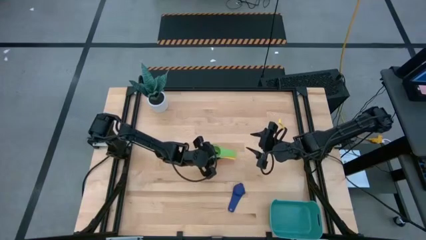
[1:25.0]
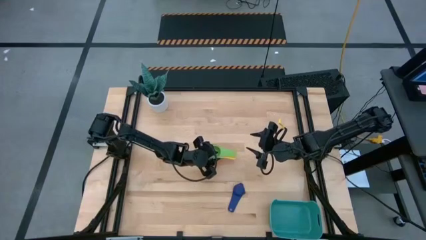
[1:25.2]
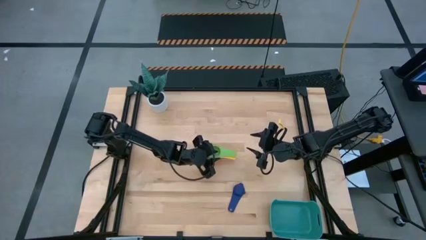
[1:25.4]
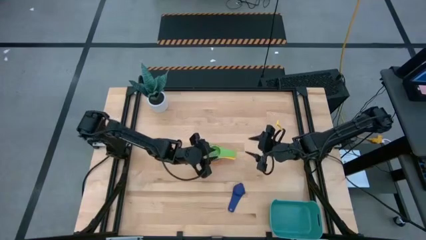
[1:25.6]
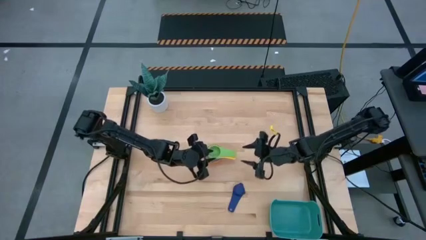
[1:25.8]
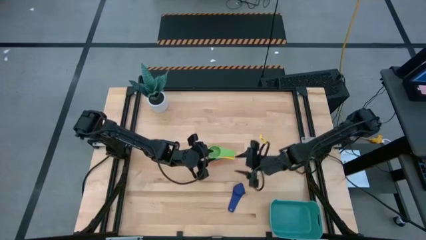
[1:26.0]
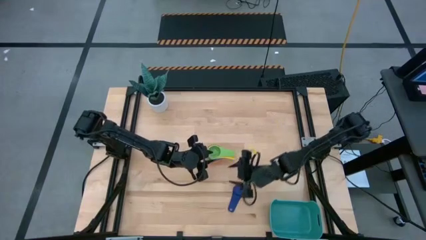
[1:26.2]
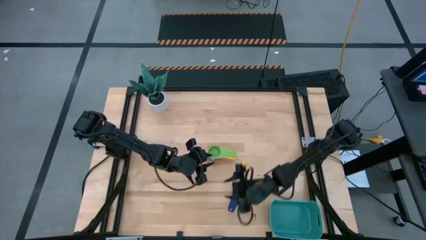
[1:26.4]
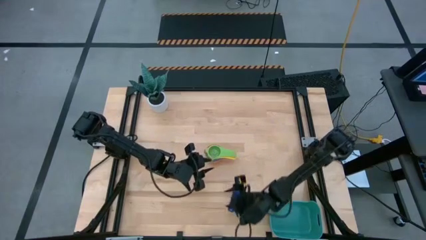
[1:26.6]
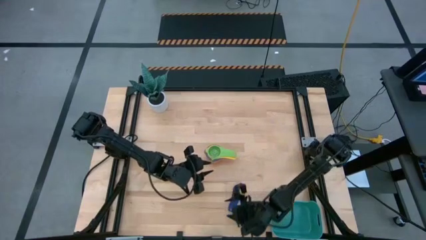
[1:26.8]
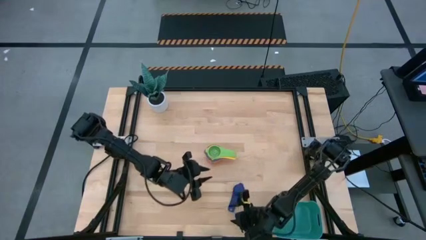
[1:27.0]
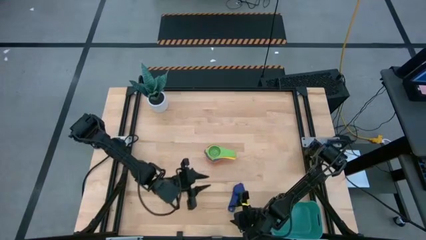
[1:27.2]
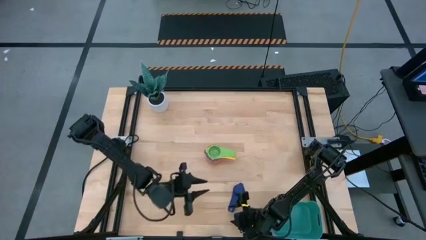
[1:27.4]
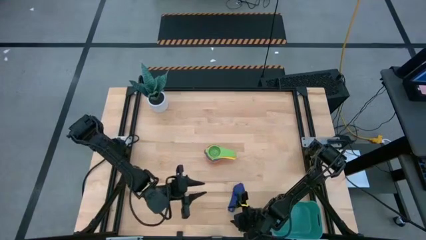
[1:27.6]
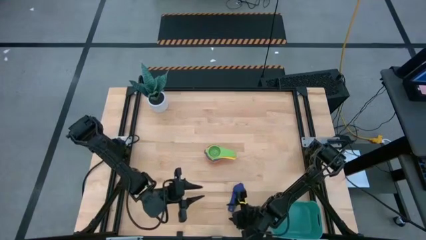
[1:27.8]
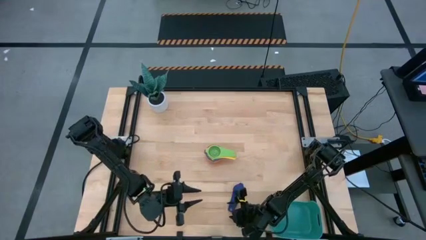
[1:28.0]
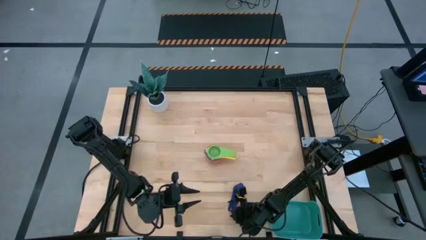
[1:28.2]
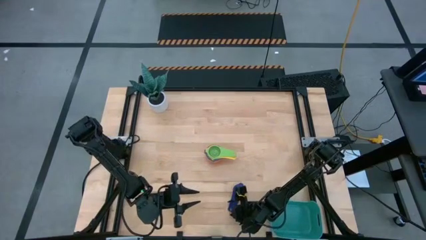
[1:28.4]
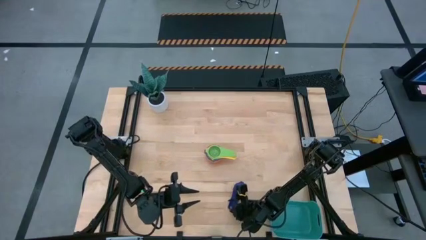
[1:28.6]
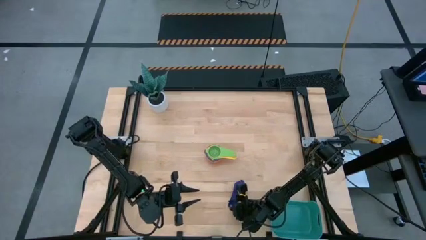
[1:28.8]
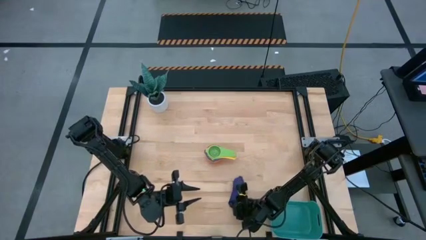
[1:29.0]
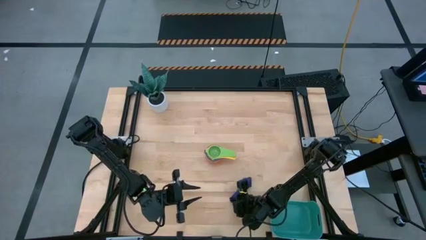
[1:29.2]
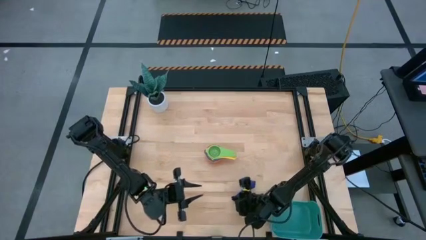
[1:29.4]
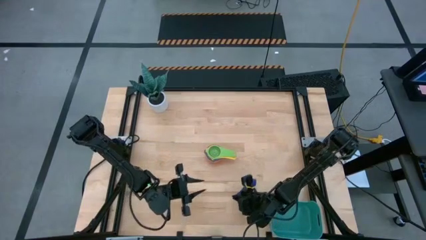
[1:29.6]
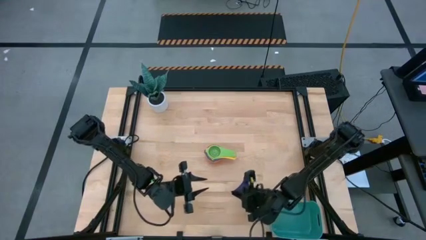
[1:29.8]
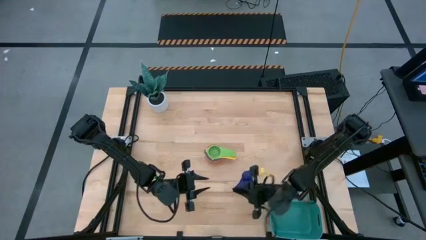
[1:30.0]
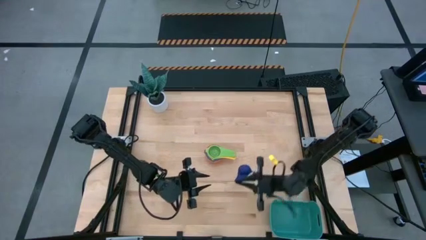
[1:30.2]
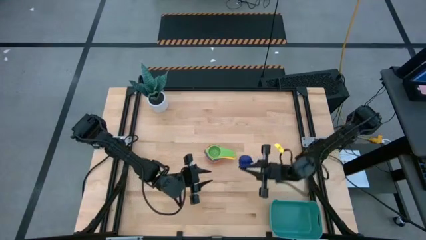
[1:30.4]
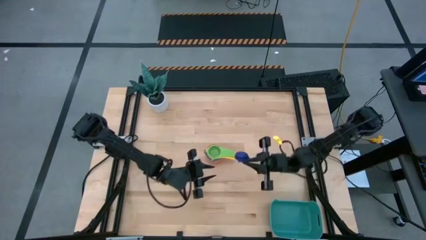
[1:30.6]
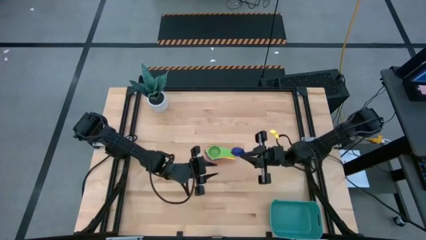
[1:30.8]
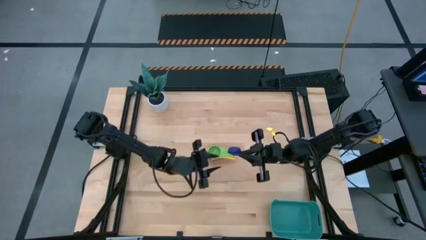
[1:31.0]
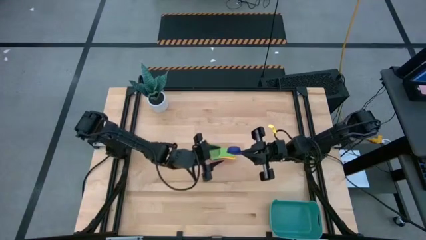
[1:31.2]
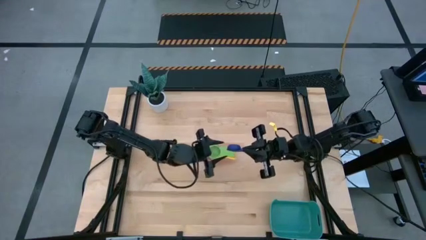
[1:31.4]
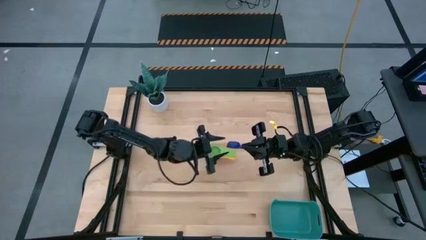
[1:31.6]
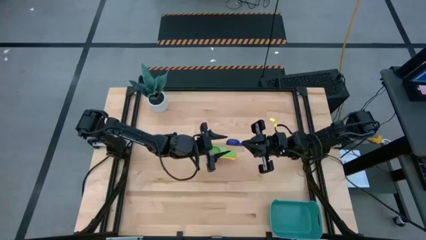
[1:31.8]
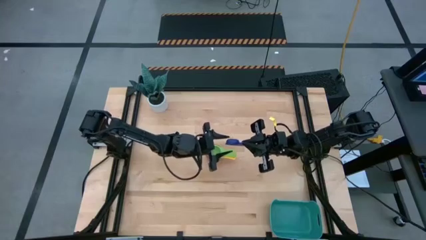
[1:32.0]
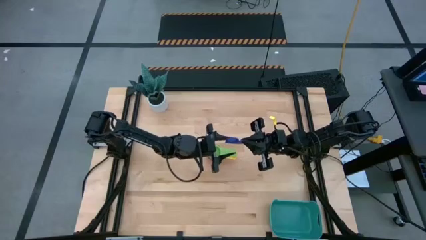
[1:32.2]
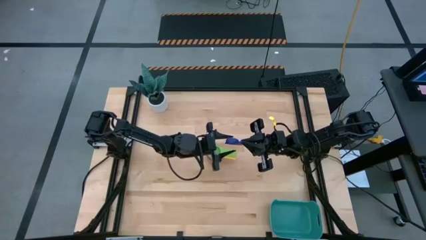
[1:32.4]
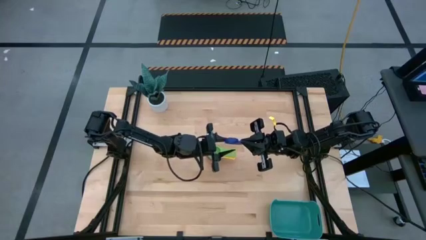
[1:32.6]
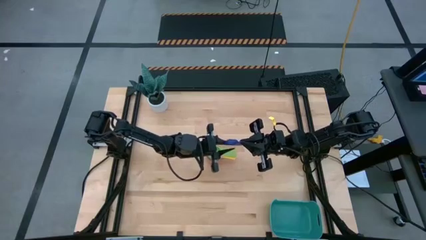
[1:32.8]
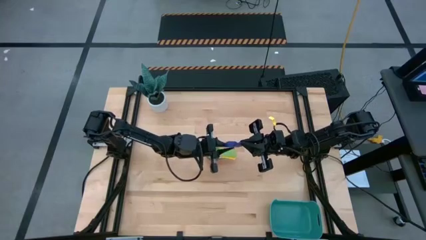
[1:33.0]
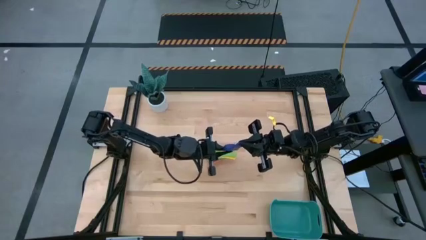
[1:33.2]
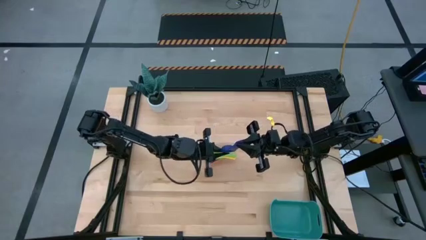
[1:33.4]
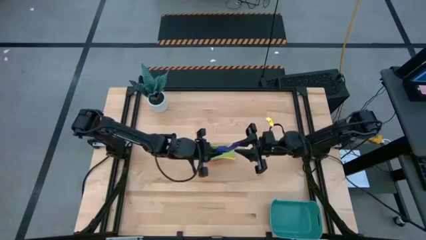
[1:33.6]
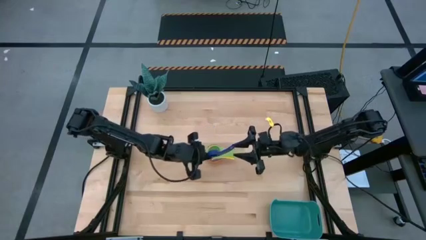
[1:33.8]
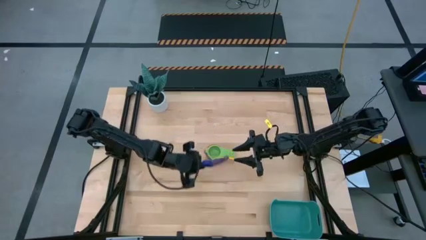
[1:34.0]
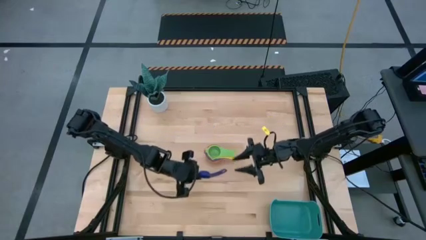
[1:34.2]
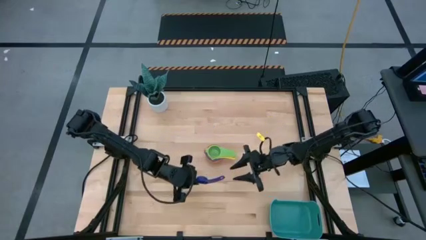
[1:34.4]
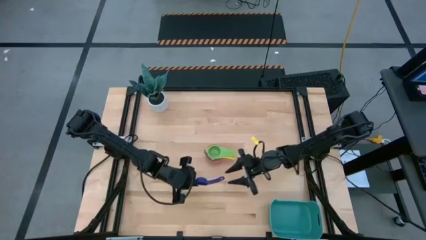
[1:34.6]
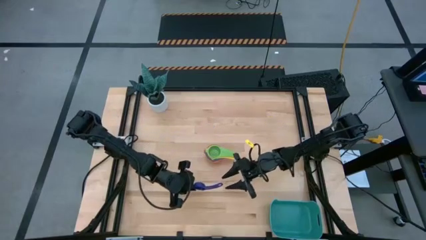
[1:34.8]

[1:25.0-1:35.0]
Task: Nest measuring cups in basket
Stack the dark blue measuring cup on top of the green measuring cup
